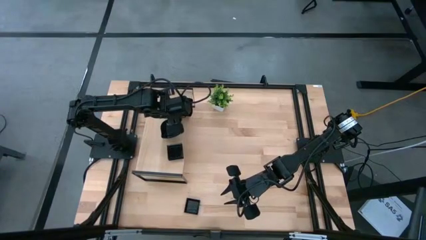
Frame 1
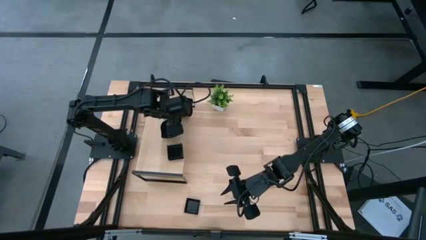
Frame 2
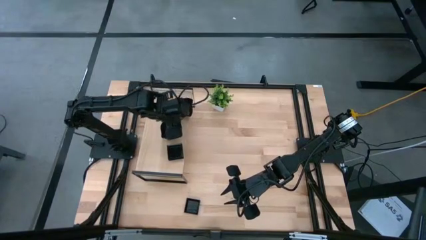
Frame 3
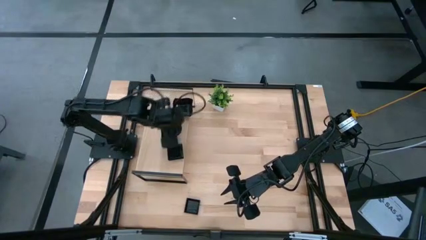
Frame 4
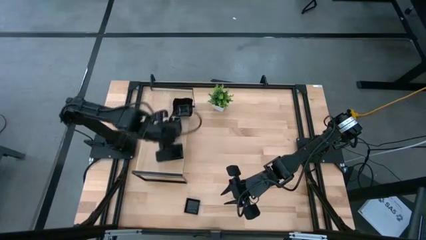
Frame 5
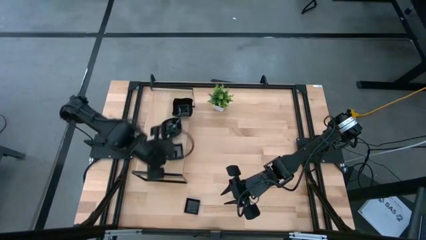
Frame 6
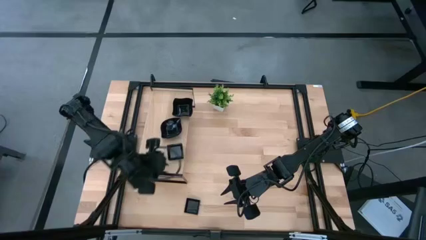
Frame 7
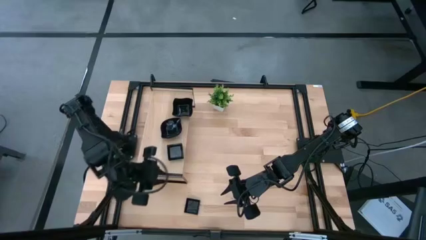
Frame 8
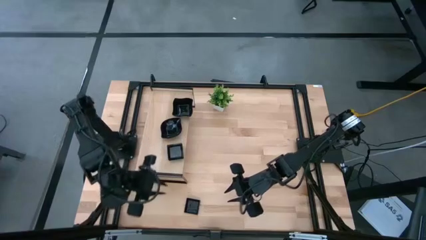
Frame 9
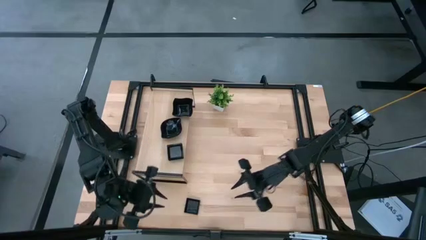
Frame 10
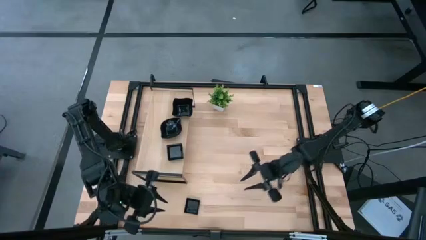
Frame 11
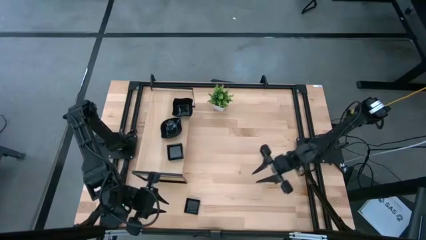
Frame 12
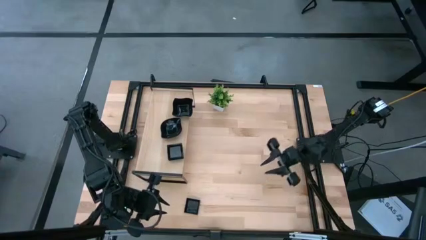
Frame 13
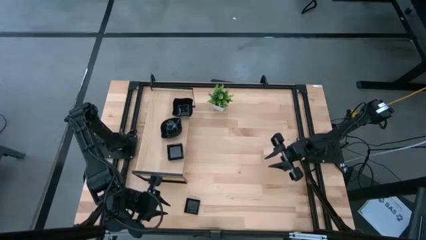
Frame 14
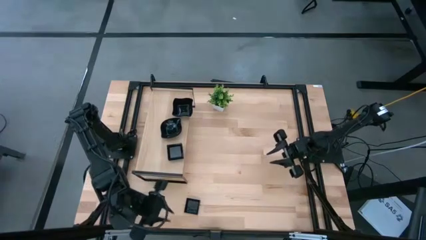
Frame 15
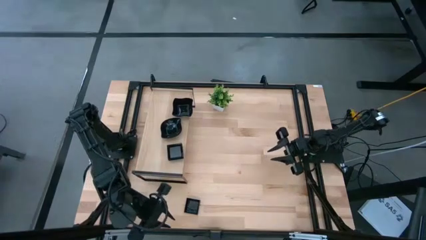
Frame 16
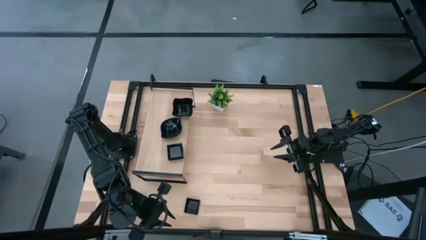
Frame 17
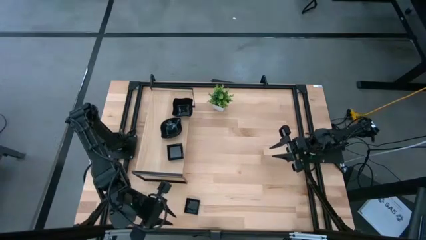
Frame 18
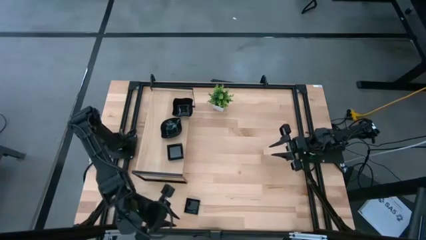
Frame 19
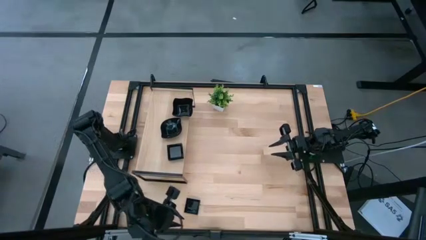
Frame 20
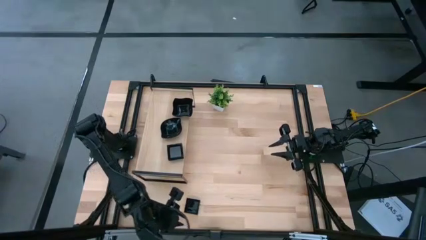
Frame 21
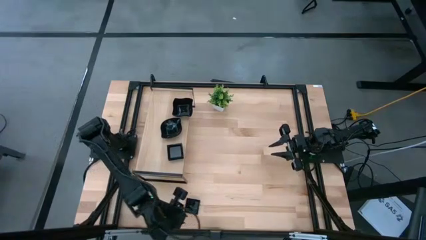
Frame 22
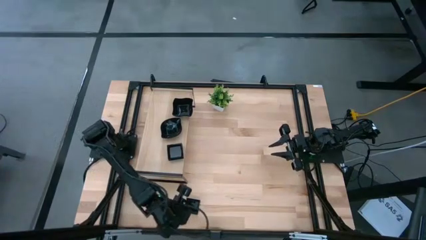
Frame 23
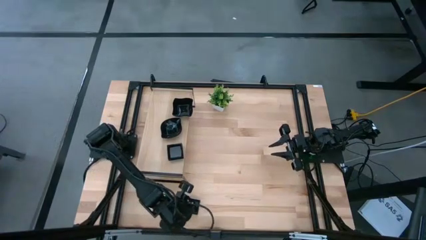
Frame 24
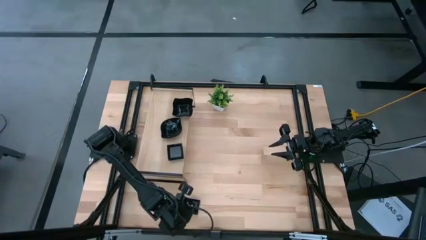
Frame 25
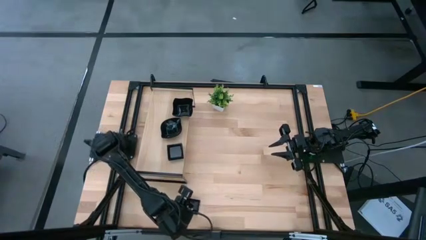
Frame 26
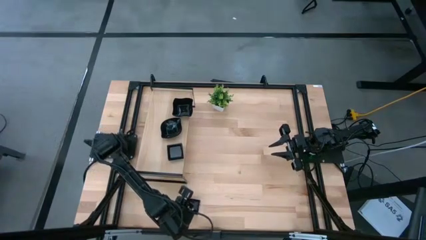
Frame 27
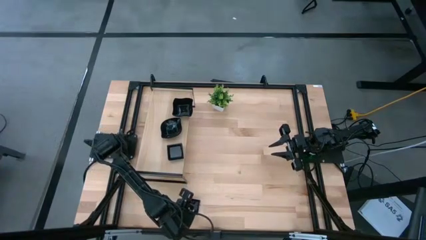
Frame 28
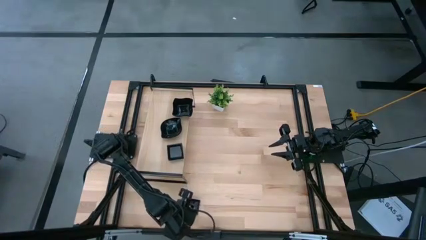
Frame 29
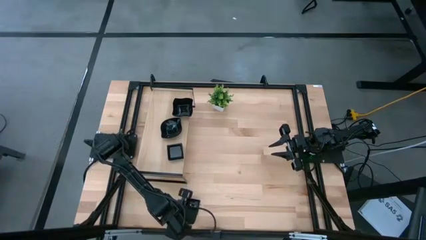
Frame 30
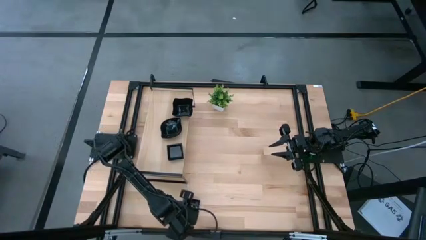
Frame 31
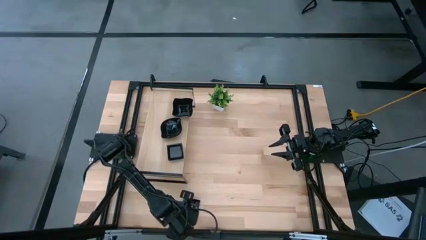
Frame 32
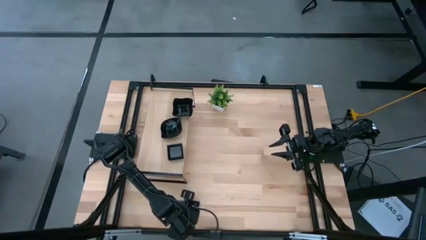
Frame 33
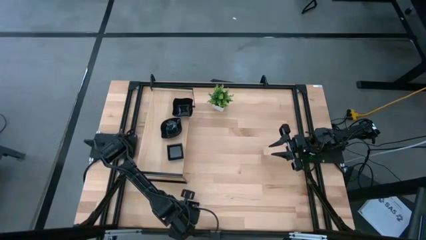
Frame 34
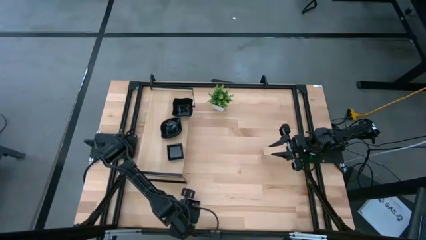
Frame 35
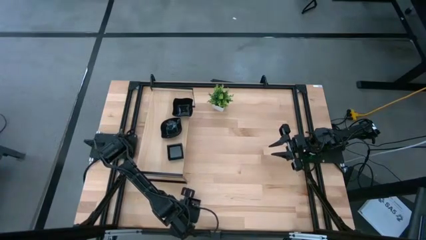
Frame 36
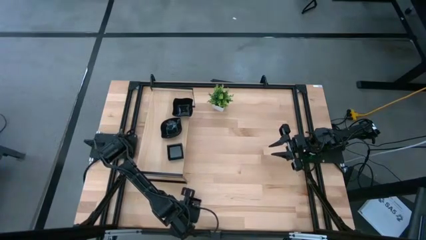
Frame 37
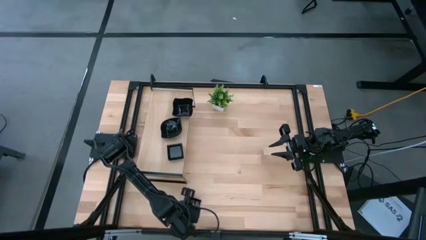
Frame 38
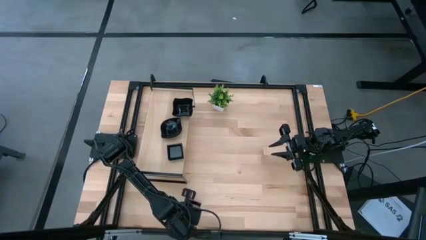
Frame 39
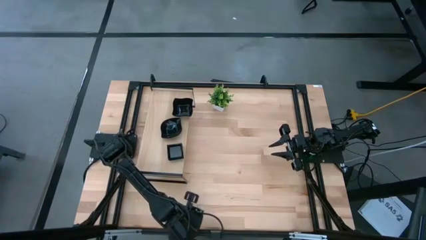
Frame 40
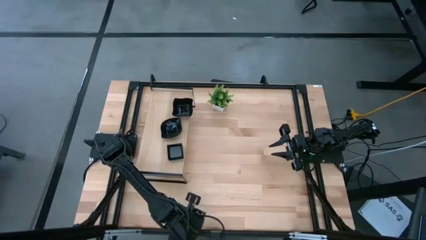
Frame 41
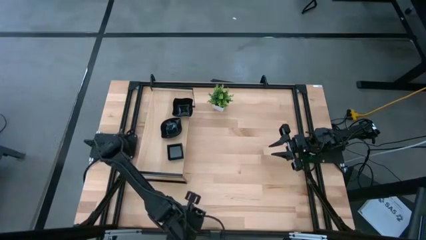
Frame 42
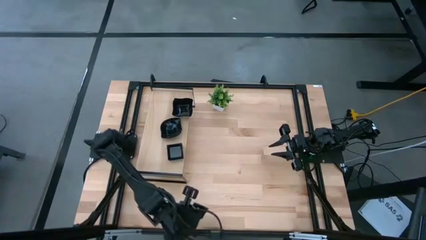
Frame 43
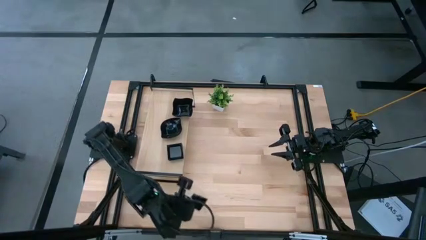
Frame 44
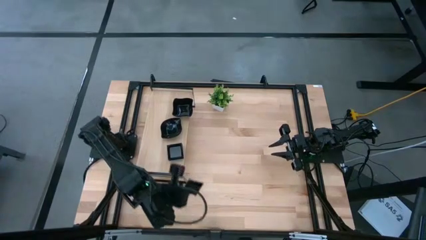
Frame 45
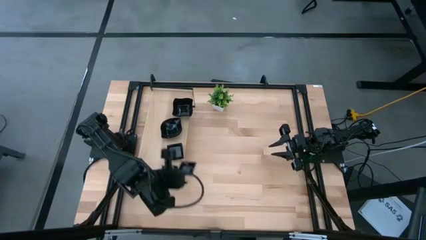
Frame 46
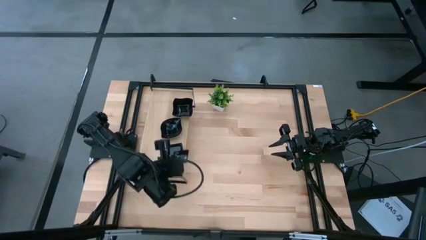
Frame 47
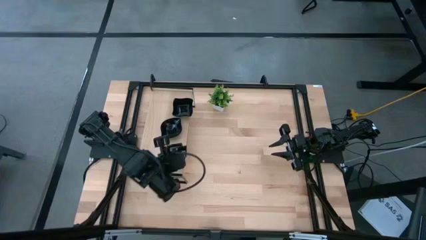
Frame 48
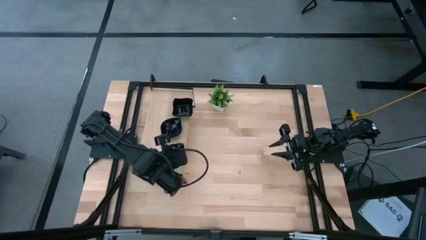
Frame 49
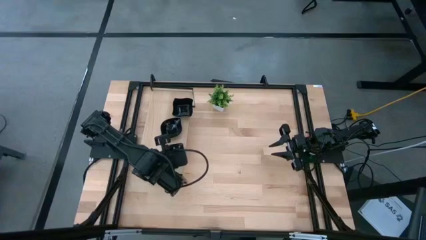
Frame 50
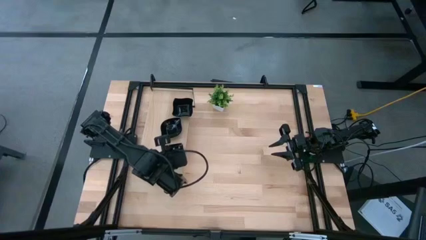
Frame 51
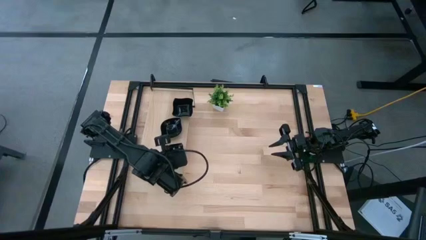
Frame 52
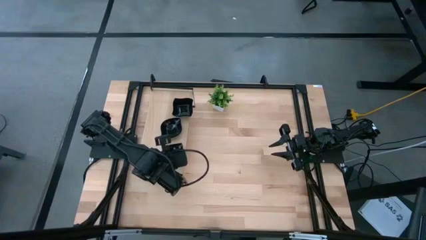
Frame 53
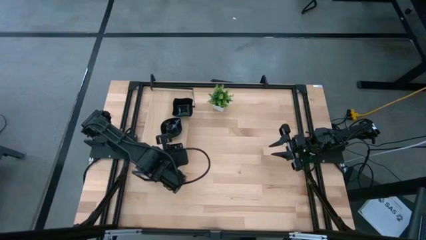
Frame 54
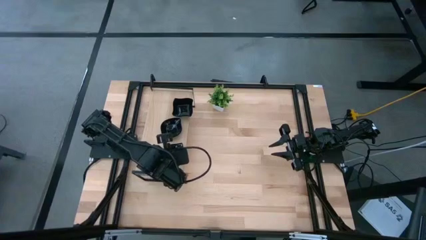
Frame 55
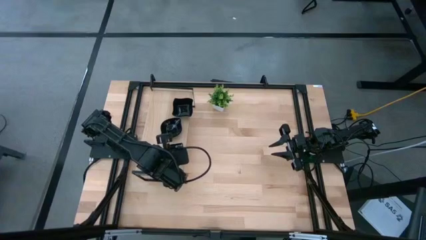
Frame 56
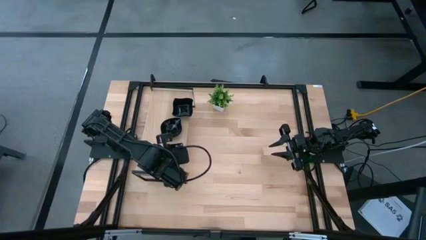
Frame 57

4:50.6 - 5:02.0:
Task: Pick & Place Mini shaped plates
Stack the black square plate on top of the black square plate on the shelf

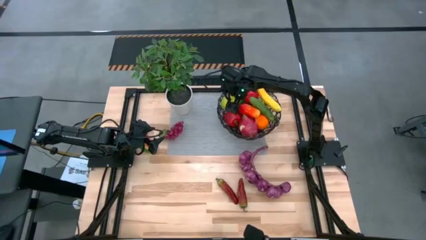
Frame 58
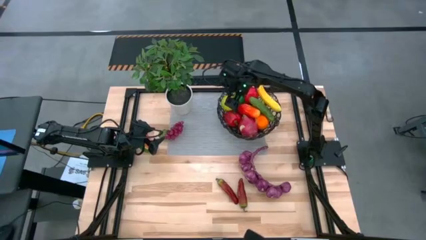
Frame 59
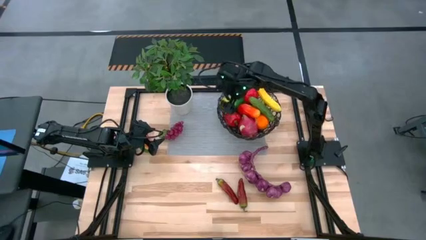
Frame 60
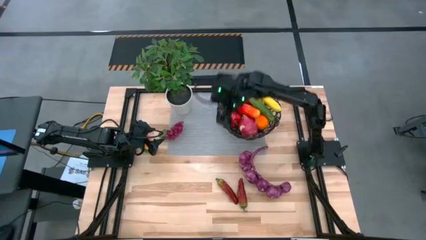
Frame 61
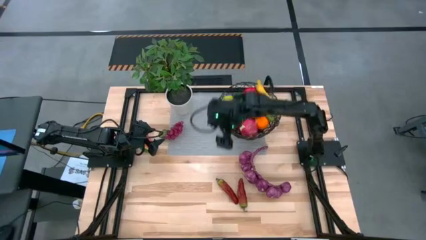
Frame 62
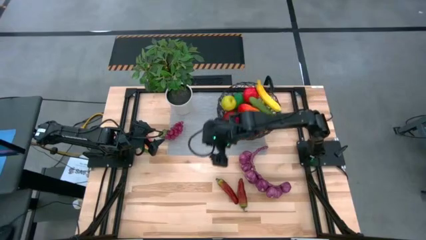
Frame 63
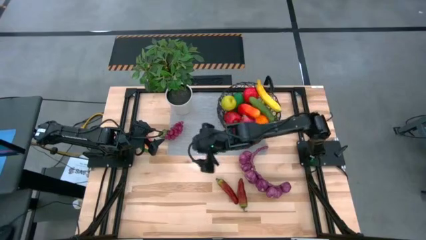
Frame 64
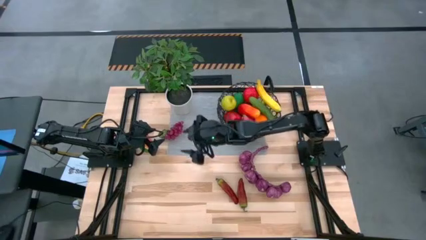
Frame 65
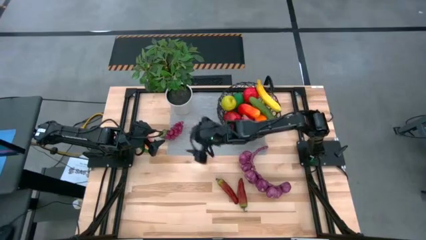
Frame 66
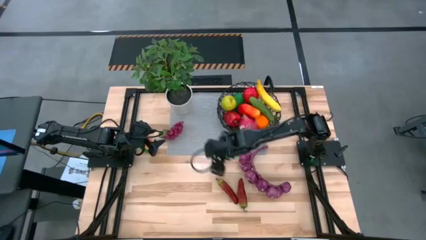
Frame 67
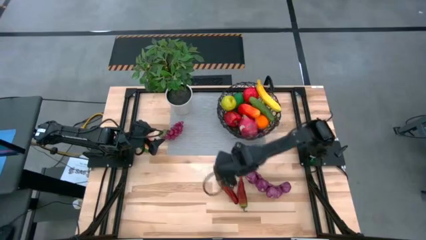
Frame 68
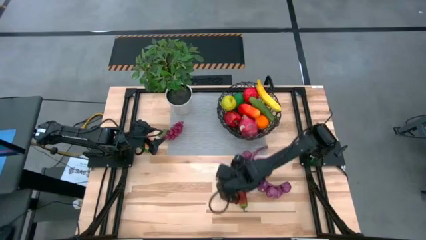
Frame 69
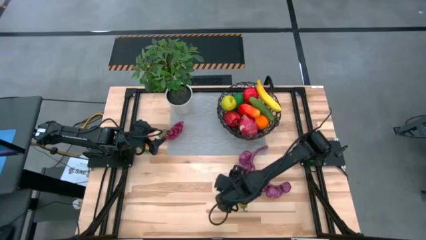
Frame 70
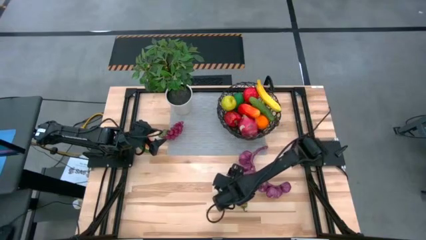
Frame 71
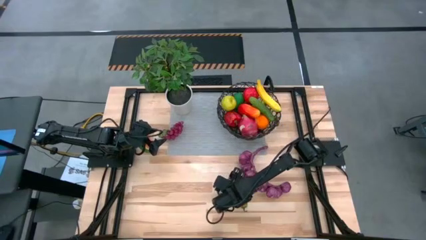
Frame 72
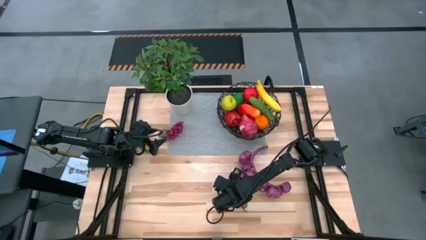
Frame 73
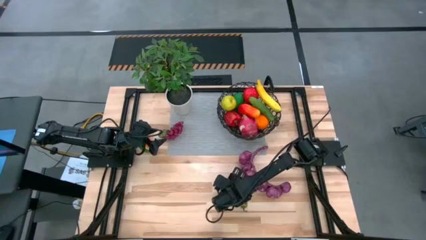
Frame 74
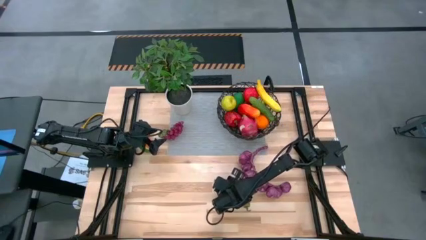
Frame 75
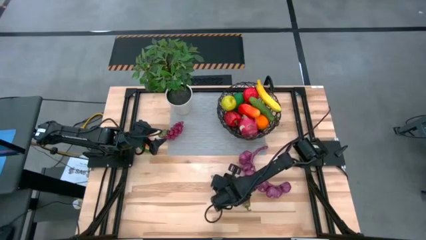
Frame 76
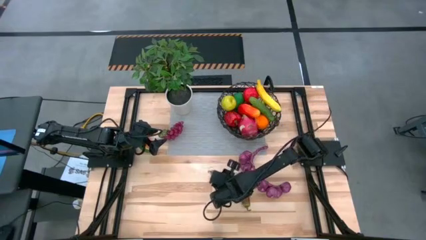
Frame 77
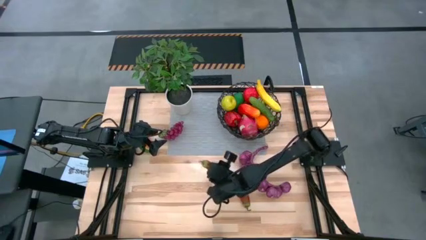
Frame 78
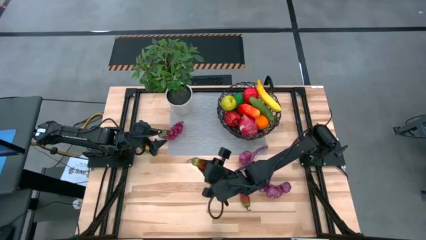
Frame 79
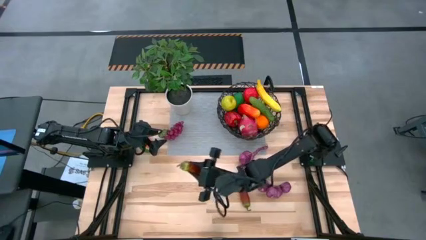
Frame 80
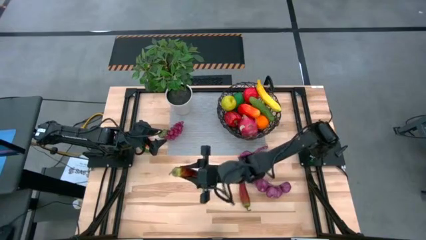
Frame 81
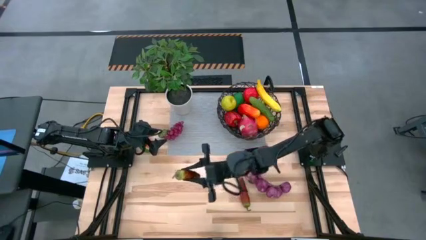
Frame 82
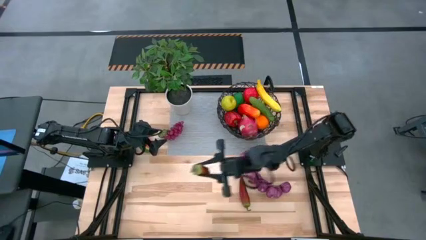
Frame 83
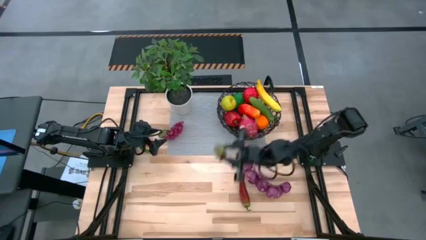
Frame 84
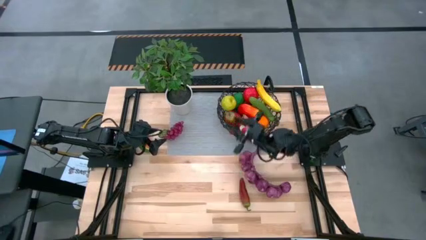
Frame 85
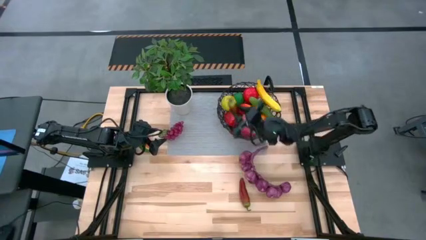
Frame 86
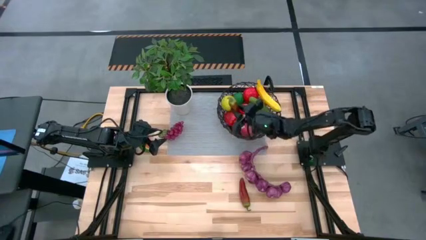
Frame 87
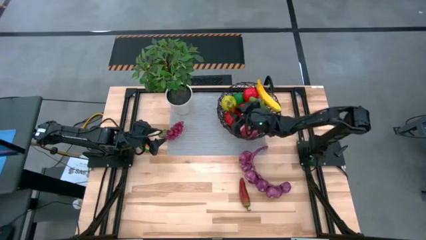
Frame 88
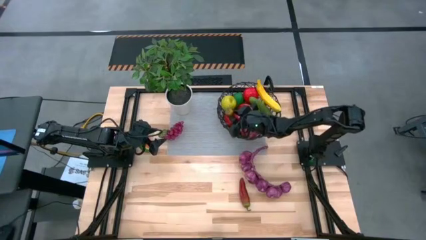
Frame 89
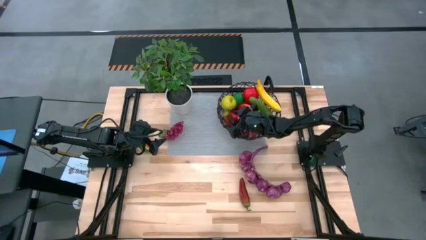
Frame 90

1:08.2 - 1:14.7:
Task: Build produce basket
Put the left dark red chili pepper into the wire basket
